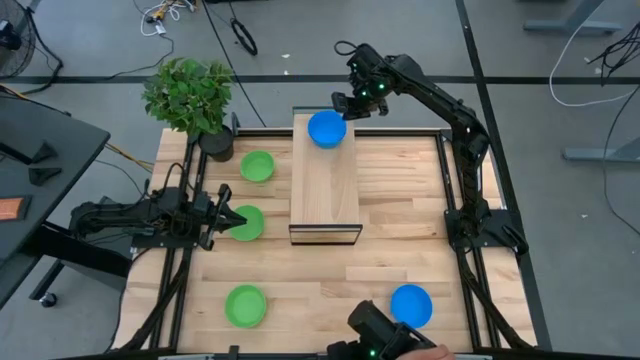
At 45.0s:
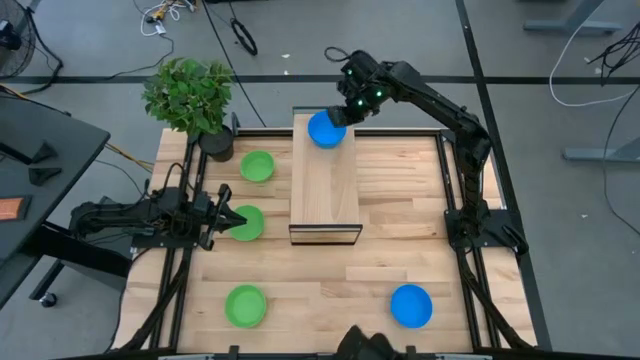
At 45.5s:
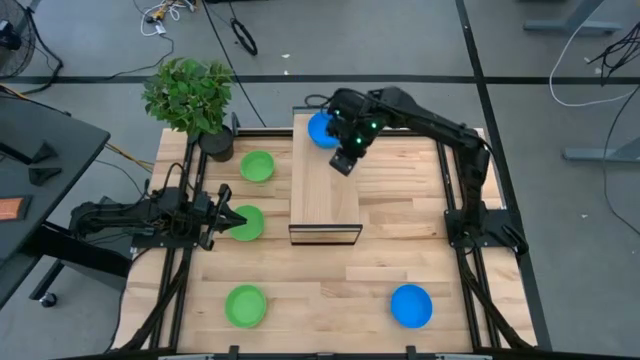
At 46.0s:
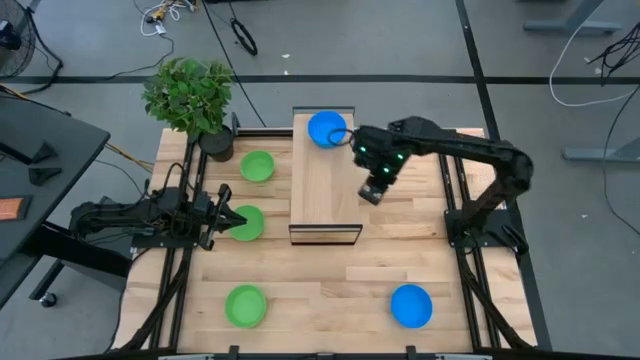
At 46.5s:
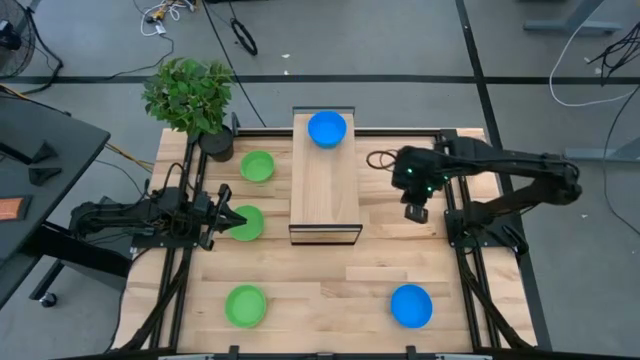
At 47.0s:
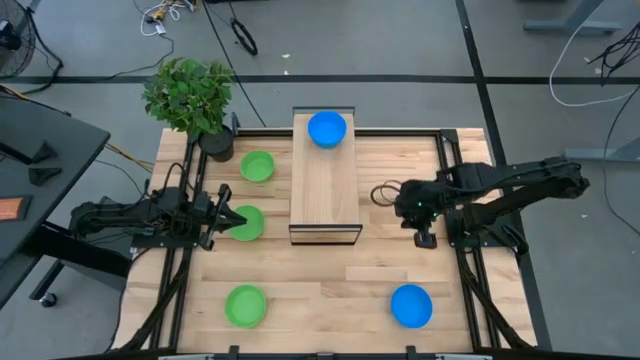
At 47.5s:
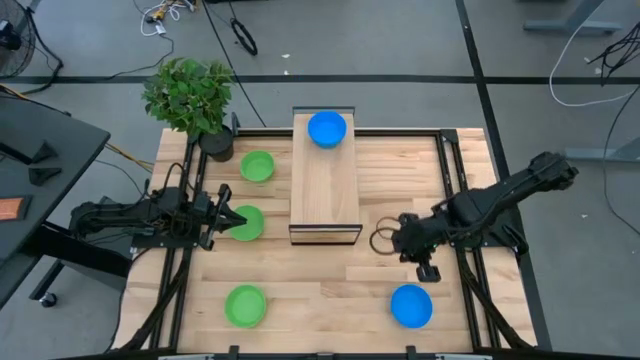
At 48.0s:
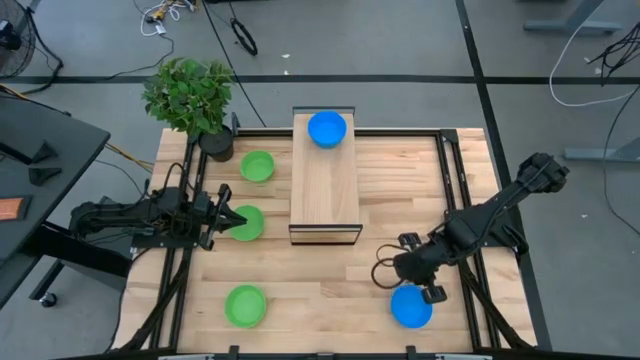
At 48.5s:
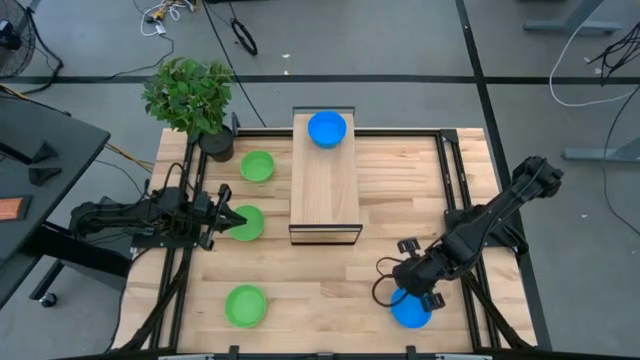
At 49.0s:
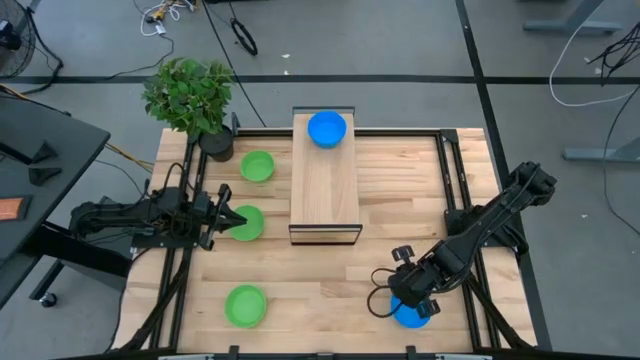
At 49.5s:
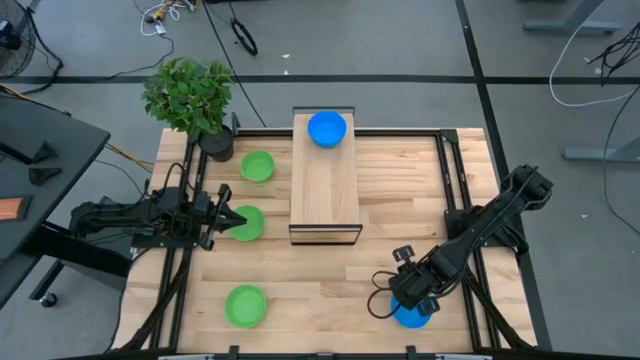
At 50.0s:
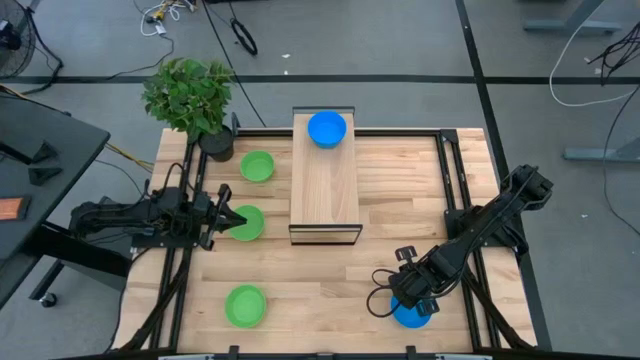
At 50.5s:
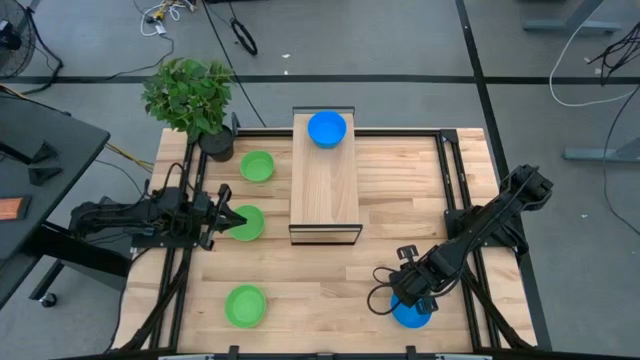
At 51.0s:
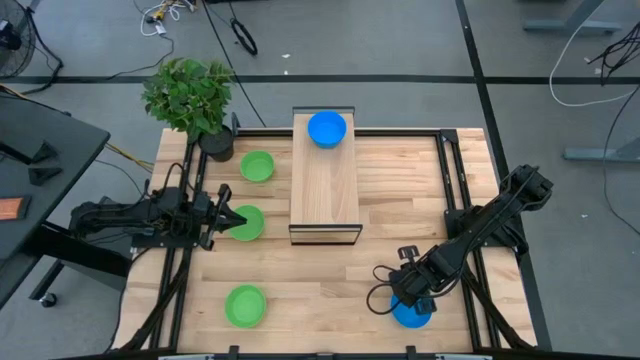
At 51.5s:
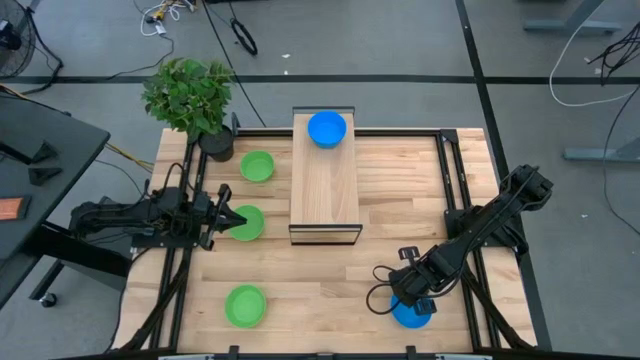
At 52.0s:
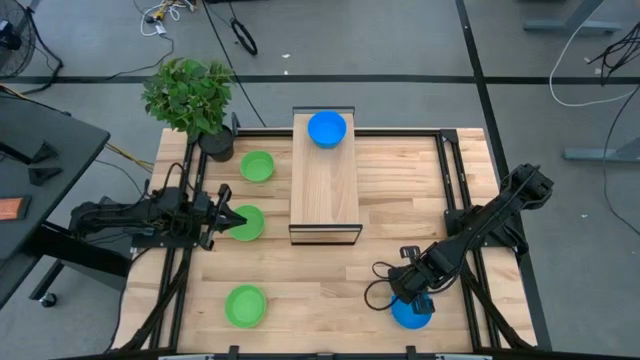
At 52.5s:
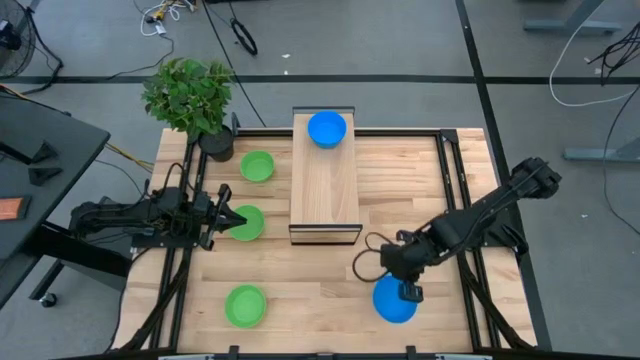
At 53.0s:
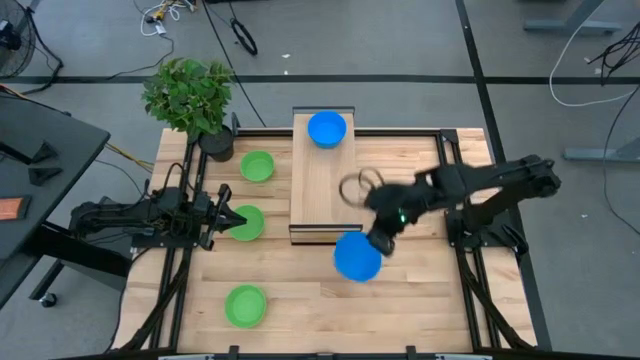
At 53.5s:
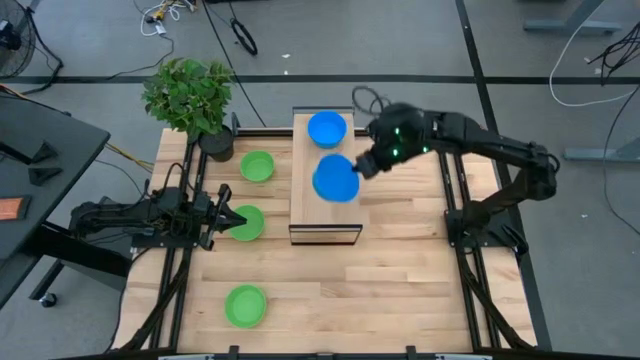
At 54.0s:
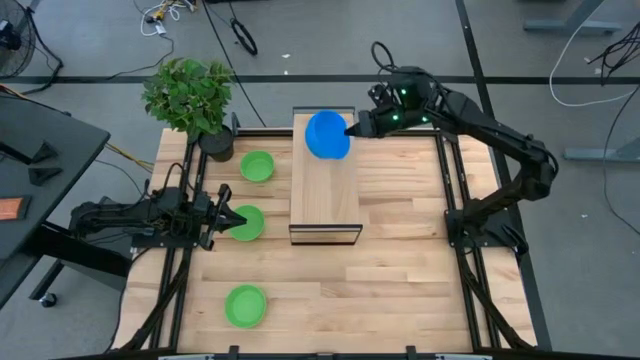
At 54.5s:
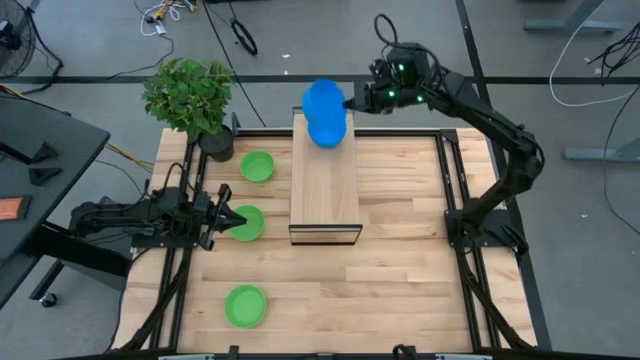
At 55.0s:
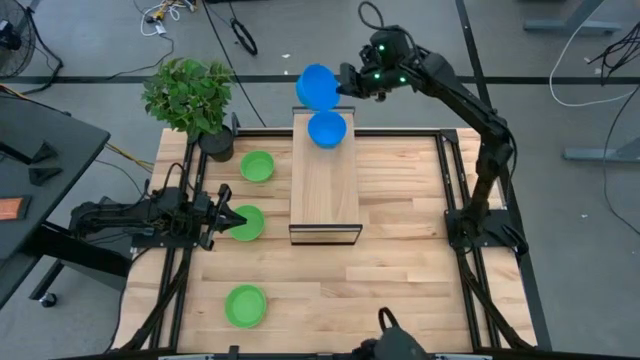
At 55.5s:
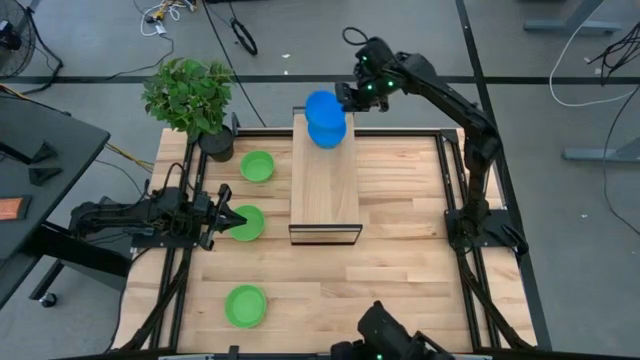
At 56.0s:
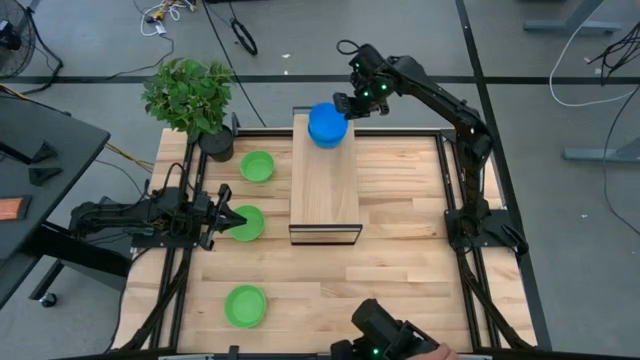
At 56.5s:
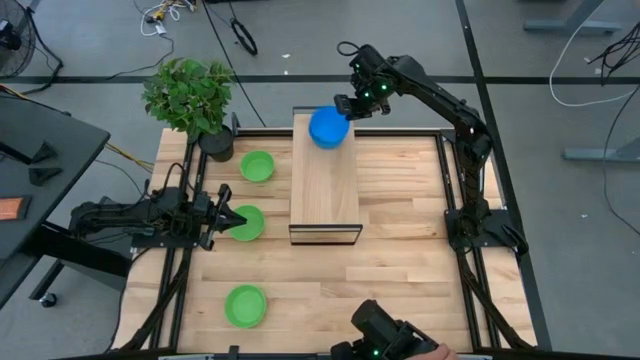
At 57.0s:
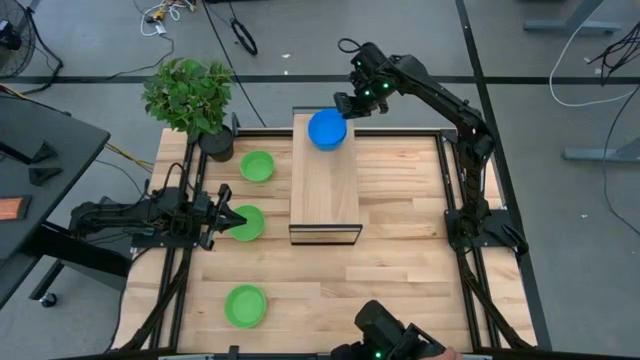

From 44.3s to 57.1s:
Task: Pick & Place Mini bowls
Stack the blue bowl on the blue bowl on the shelf

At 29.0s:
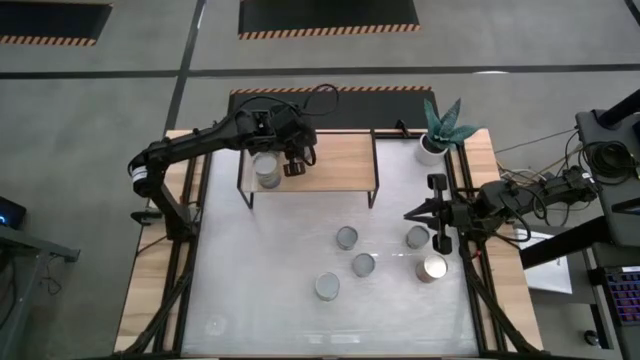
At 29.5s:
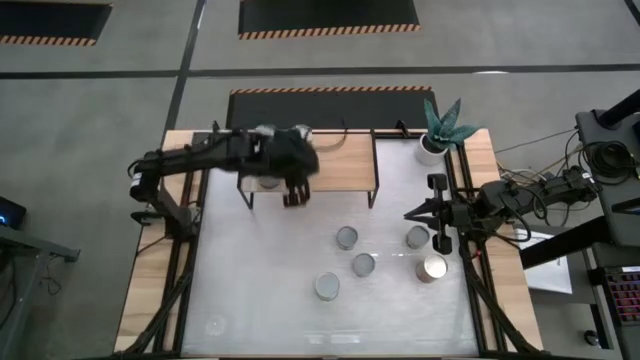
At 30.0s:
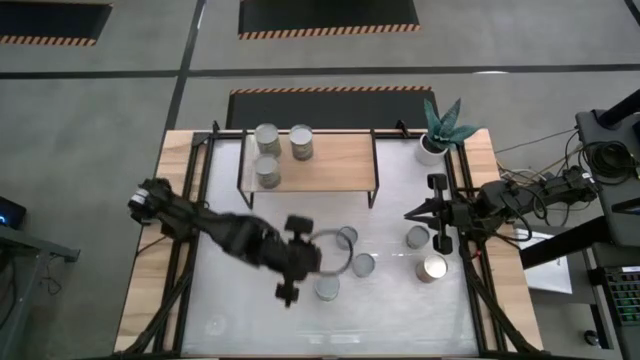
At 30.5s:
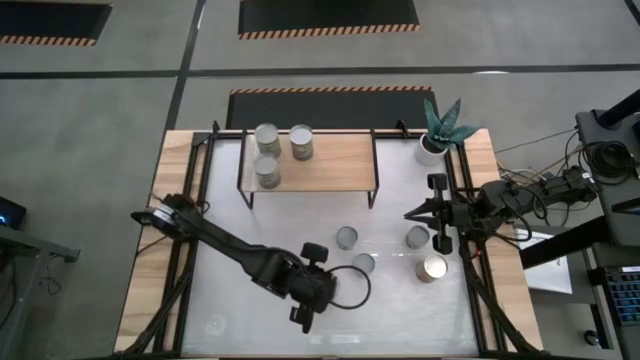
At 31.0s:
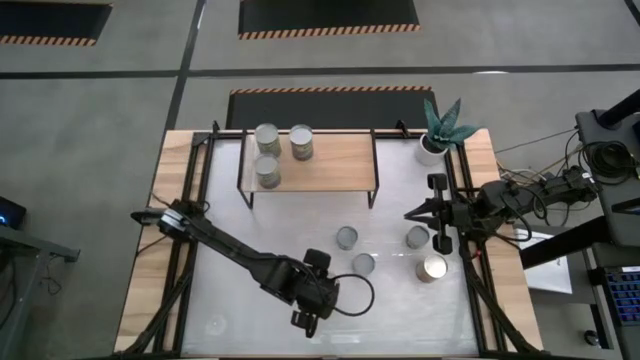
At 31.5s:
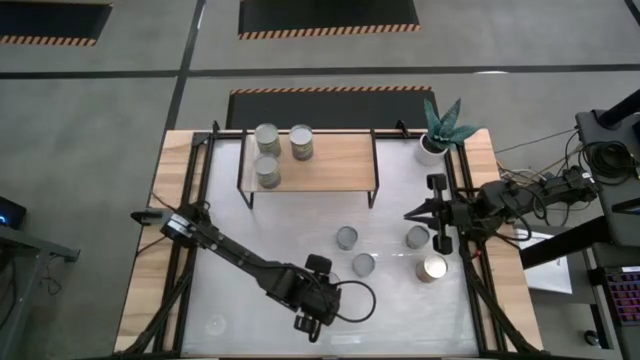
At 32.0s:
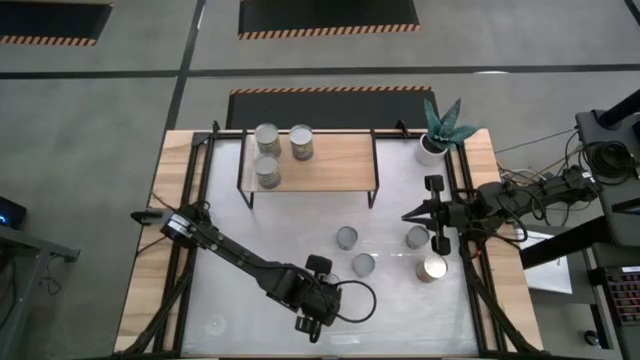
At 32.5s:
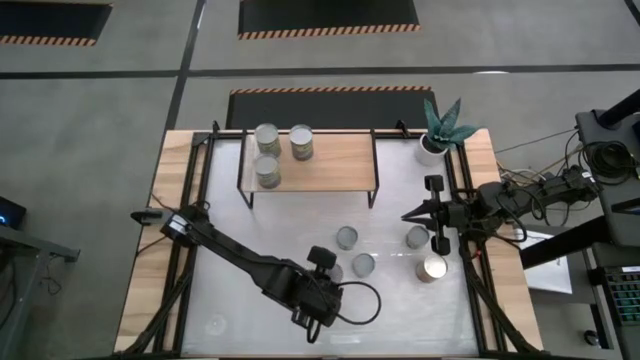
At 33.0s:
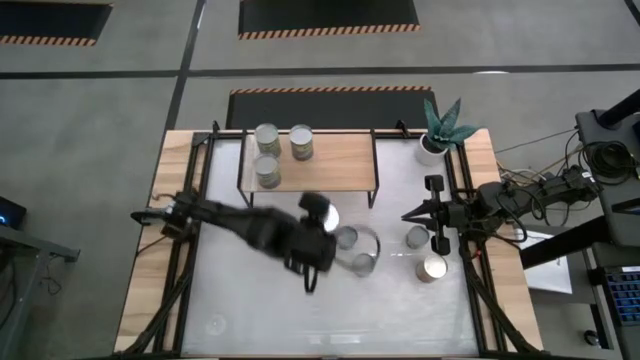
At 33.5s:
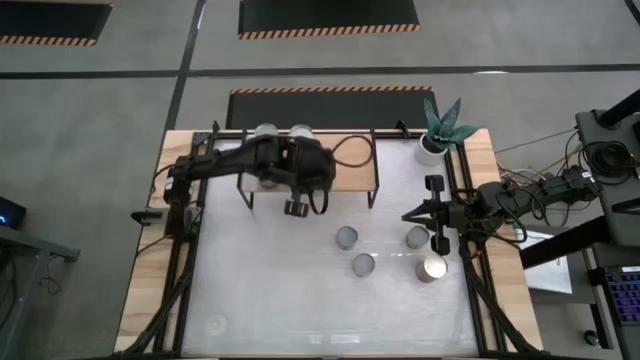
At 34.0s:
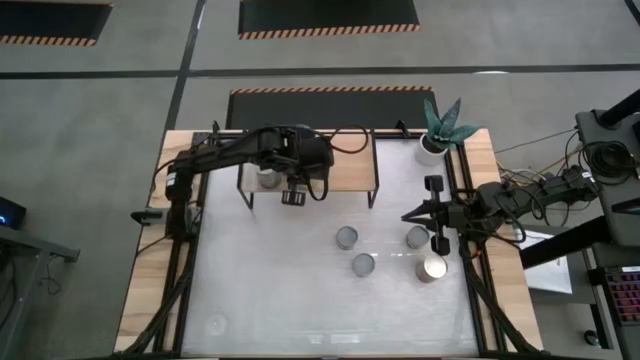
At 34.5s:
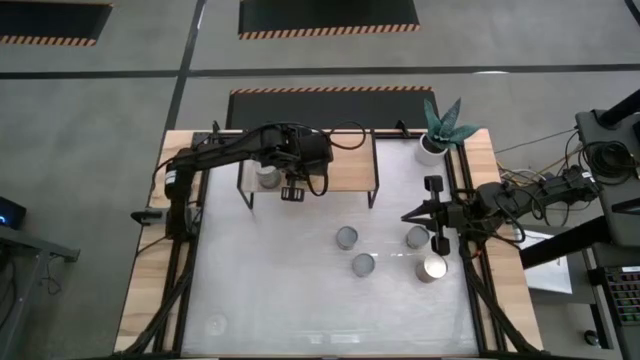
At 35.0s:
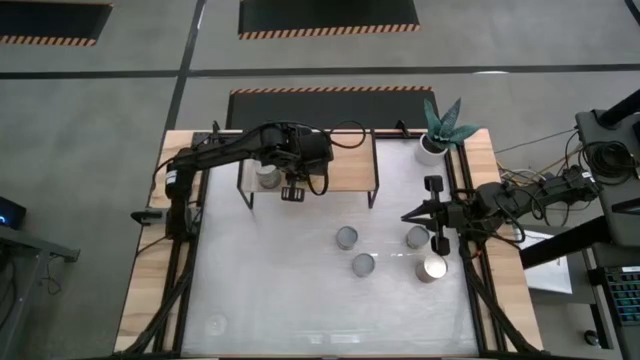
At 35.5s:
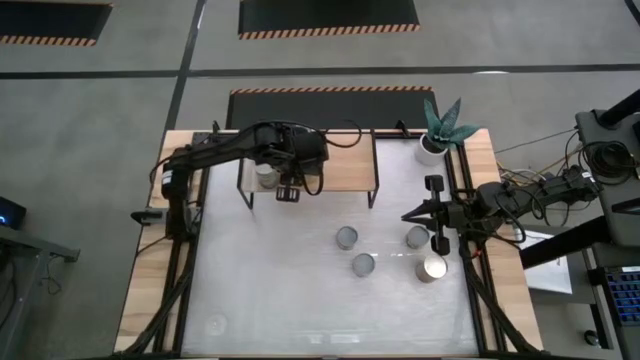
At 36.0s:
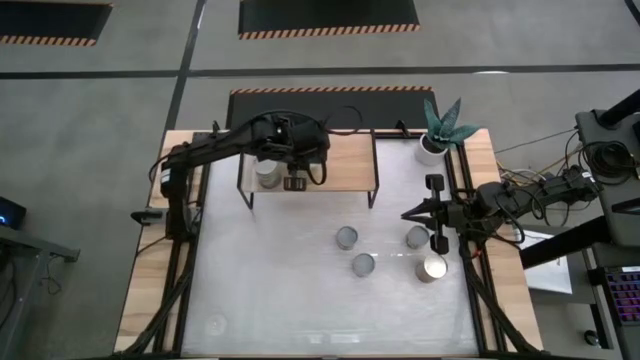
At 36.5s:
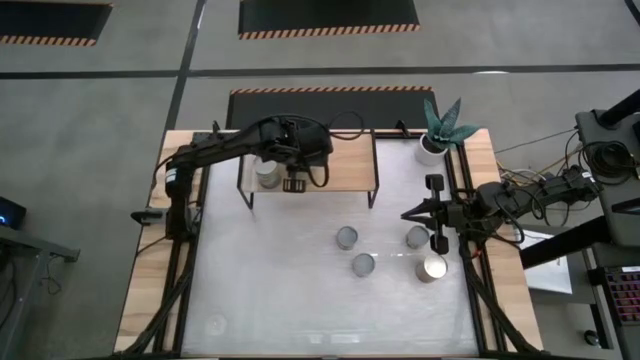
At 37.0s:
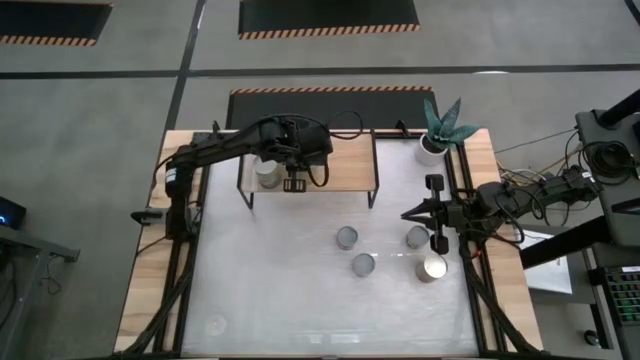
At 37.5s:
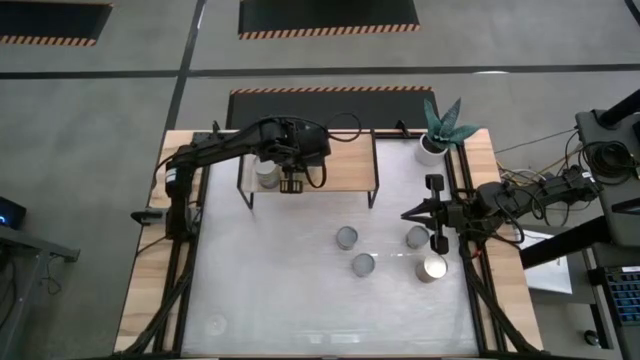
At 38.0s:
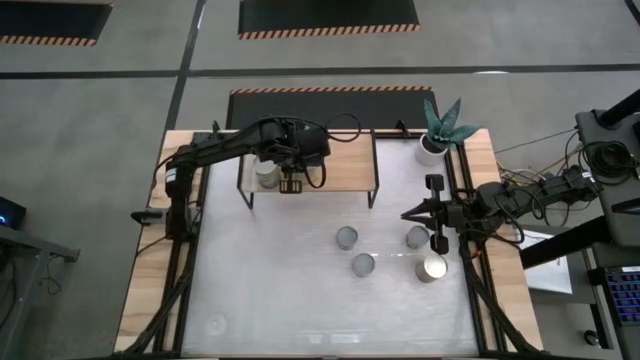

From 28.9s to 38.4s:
Task: Pick and place cans onto a shelf
Put the canned carrots on the shelf
